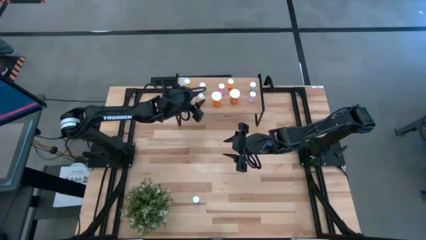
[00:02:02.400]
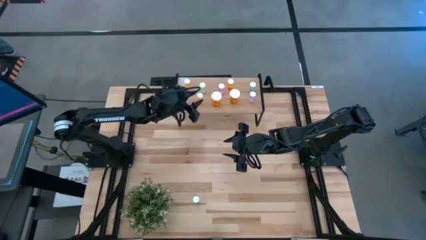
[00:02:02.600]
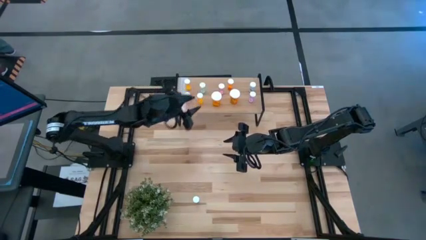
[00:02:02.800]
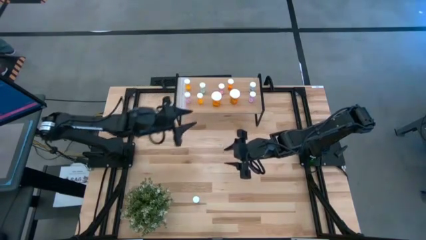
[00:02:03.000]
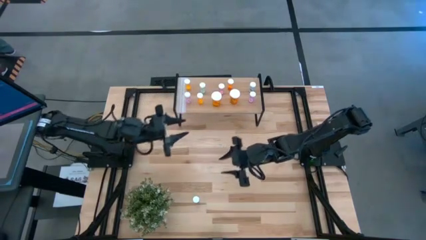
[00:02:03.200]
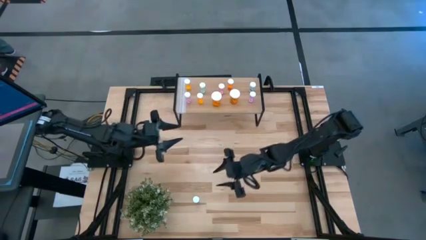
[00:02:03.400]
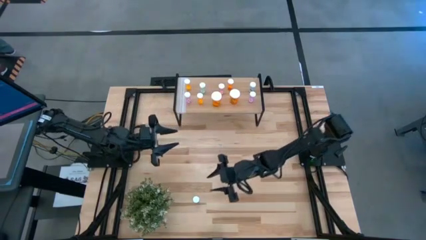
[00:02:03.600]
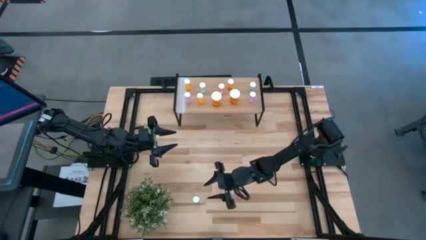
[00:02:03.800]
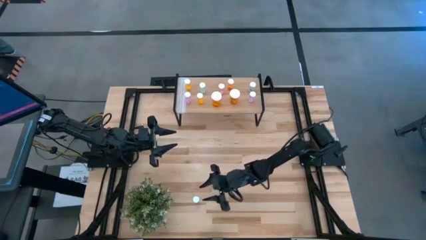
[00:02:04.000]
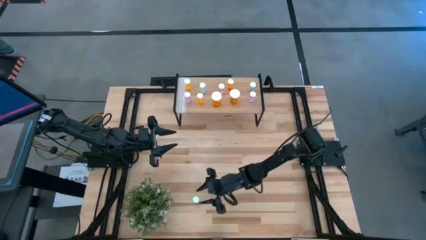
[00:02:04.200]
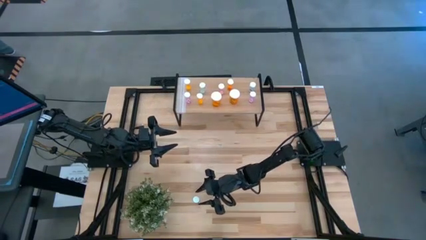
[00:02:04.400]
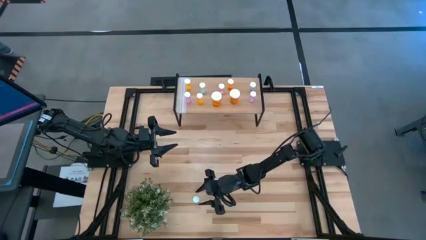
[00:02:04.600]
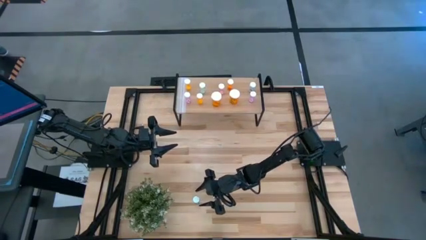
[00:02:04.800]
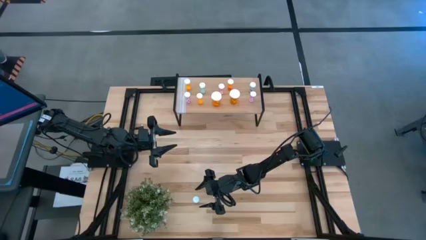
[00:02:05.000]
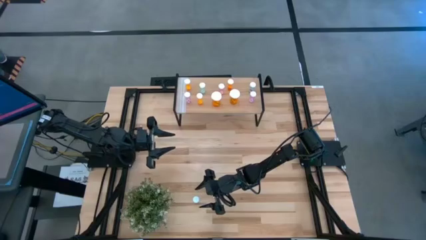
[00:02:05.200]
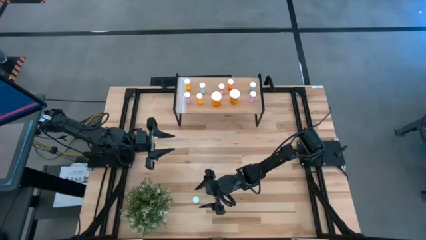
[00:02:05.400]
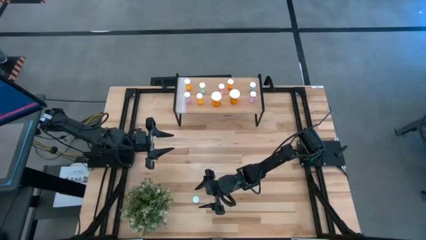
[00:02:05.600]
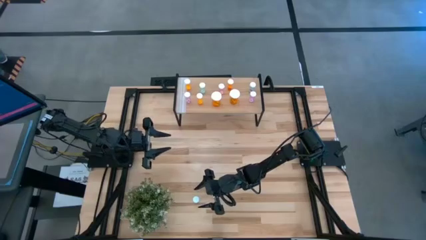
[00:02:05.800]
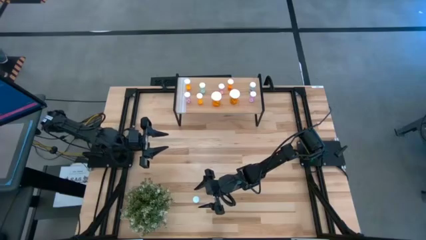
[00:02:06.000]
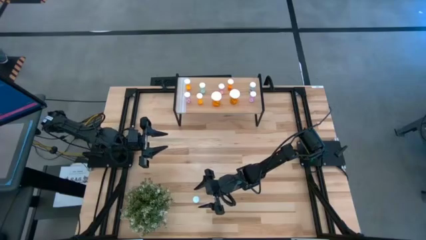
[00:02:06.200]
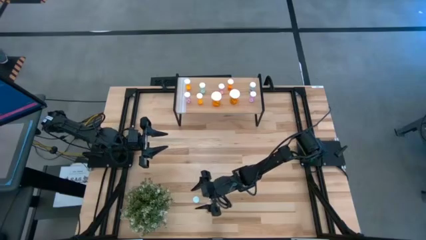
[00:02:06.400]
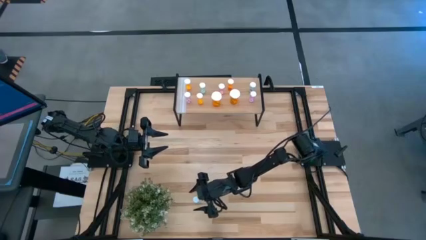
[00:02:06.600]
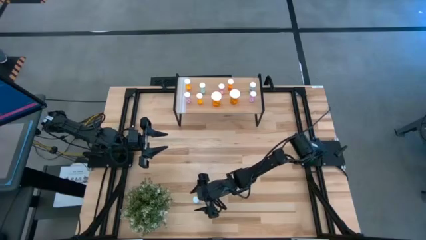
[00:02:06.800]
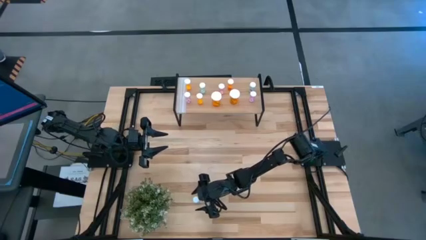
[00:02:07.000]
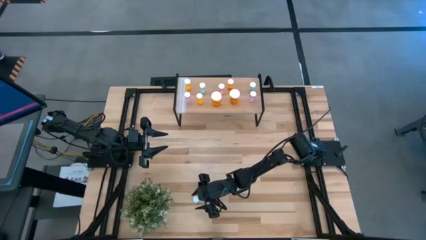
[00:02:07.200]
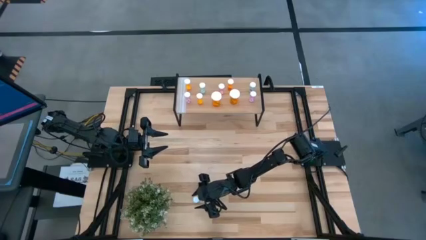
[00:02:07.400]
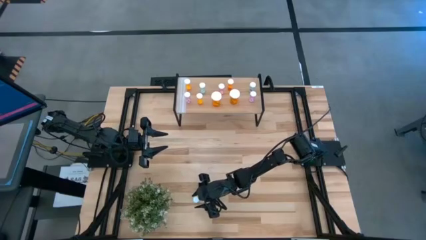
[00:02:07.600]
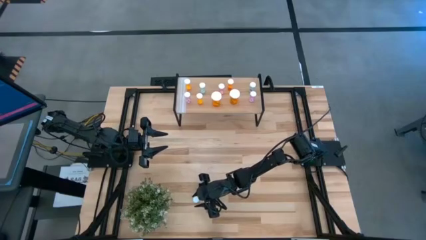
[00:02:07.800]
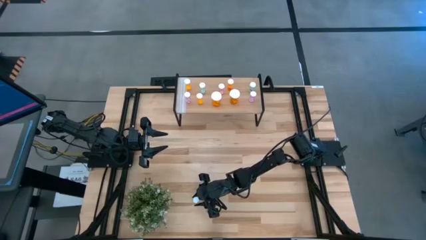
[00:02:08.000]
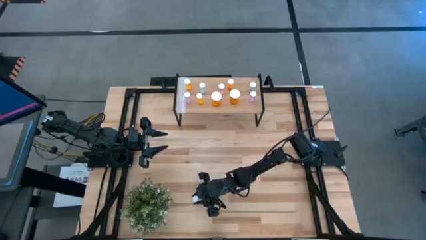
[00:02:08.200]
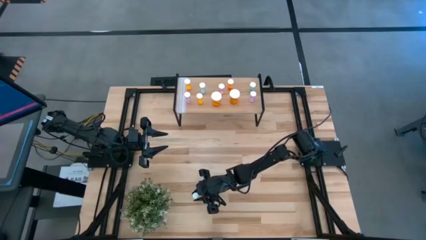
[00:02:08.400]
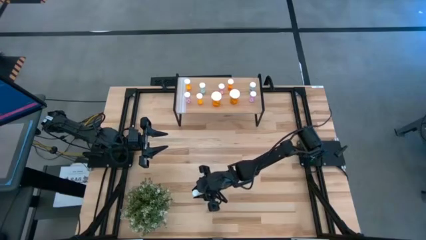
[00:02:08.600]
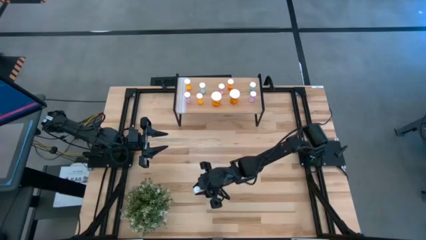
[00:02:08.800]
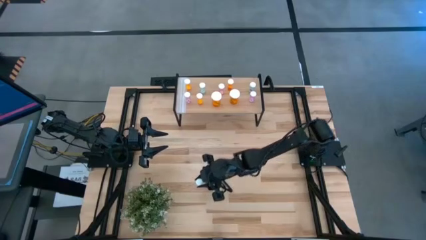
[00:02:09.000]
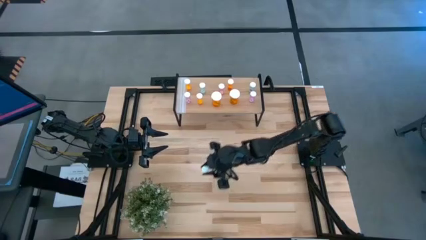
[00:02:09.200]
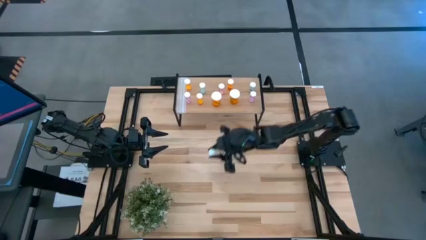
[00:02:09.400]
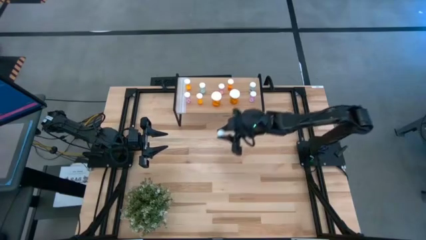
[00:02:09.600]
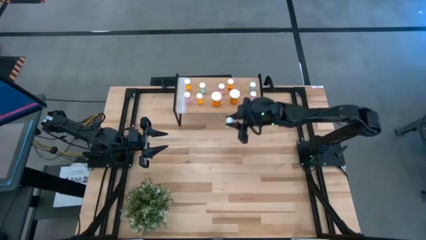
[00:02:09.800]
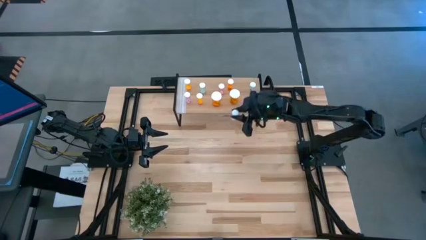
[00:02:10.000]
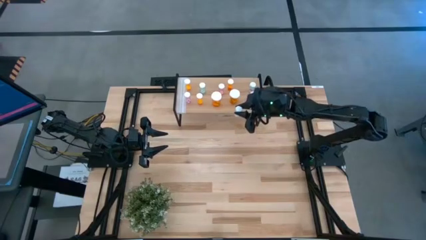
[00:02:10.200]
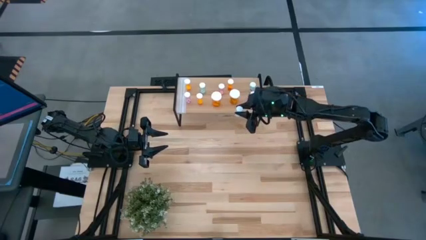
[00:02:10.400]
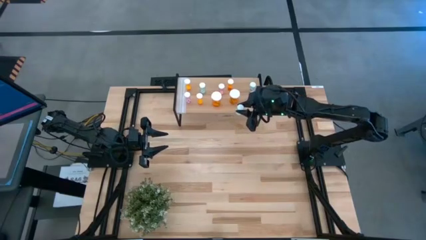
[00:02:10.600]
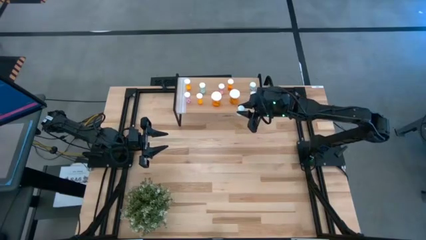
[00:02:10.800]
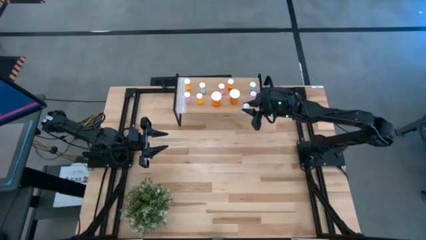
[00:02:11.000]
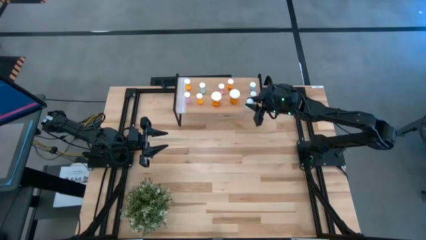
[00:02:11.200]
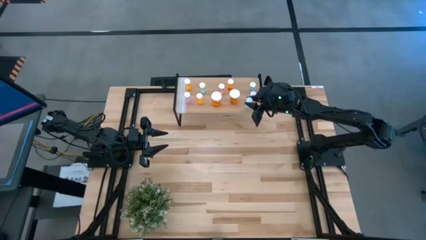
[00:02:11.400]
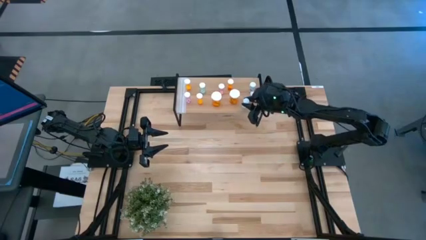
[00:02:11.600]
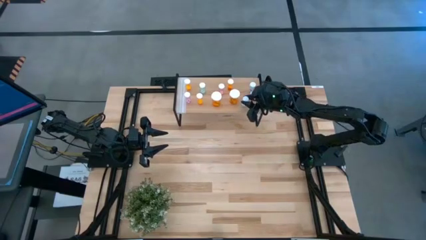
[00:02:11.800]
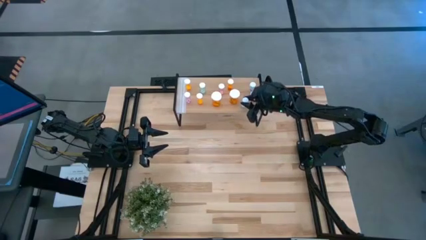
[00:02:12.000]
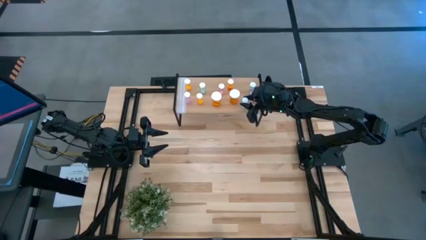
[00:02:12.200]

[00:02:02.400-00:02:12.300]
Task: Pick and place medicine bottles onto shelf by color
Put the blue pill bottle on the shelf

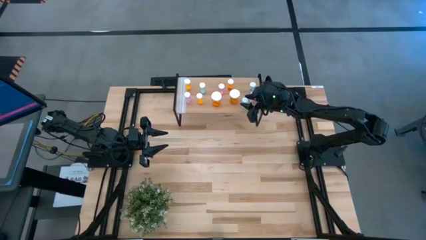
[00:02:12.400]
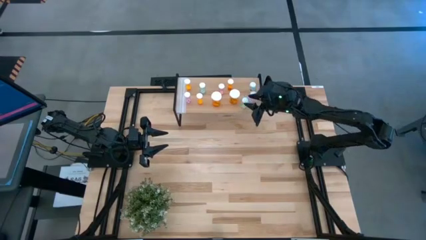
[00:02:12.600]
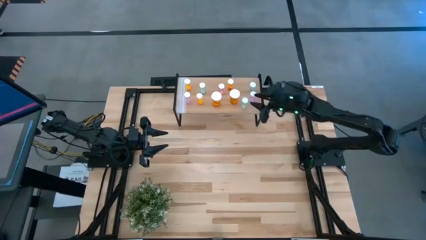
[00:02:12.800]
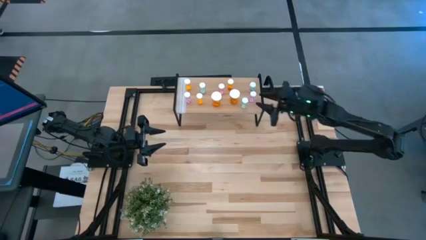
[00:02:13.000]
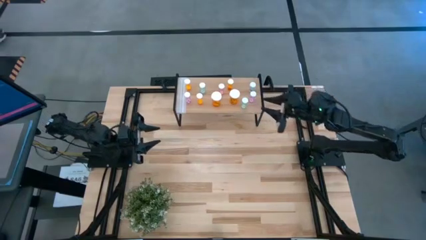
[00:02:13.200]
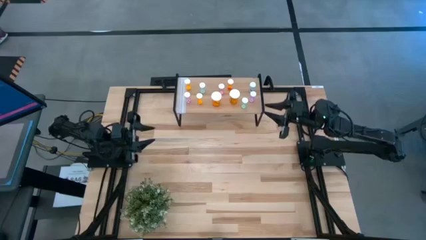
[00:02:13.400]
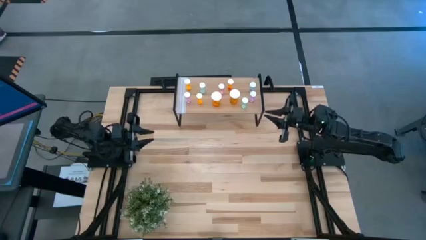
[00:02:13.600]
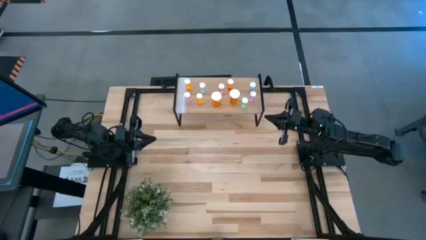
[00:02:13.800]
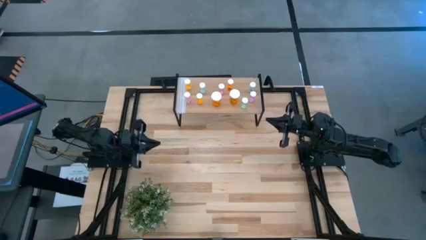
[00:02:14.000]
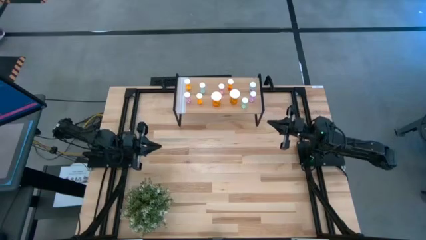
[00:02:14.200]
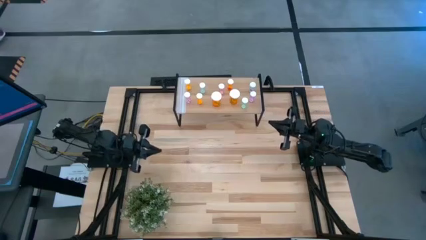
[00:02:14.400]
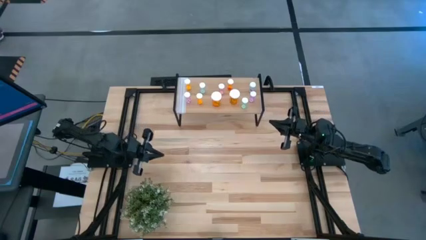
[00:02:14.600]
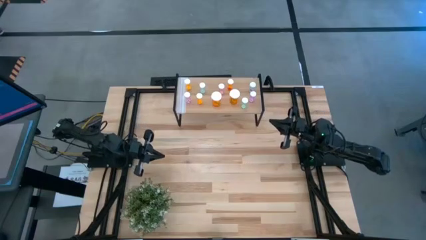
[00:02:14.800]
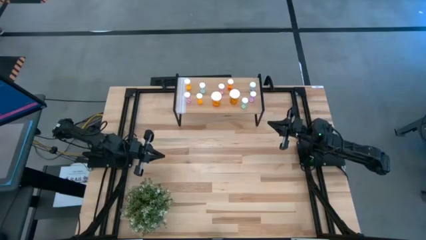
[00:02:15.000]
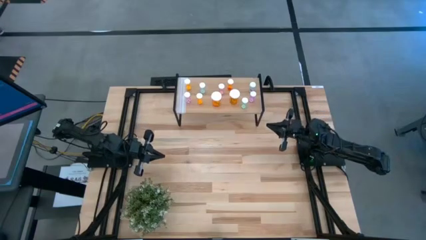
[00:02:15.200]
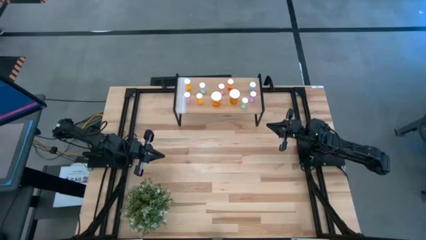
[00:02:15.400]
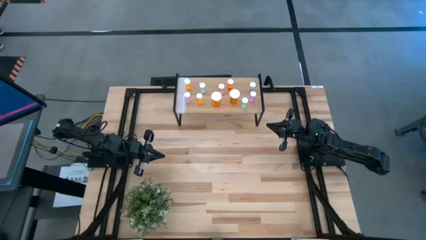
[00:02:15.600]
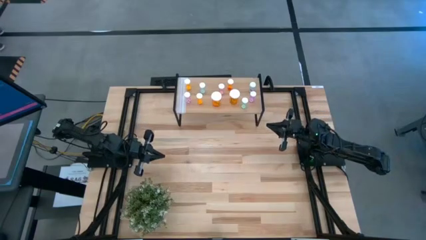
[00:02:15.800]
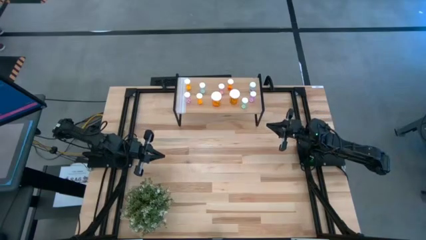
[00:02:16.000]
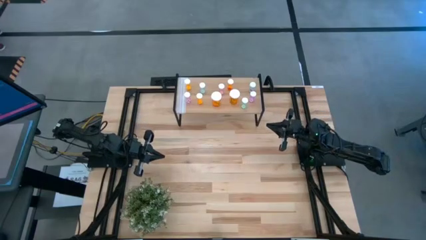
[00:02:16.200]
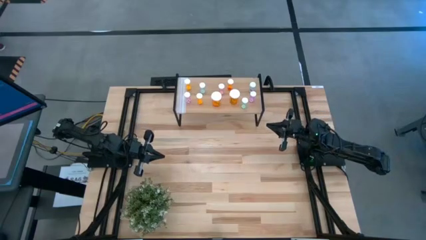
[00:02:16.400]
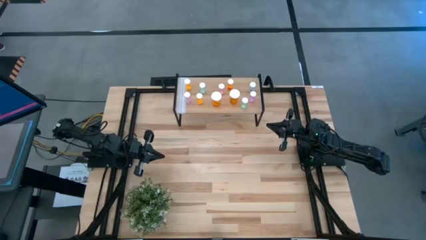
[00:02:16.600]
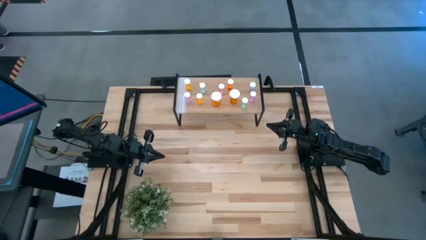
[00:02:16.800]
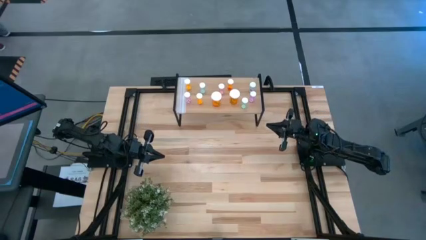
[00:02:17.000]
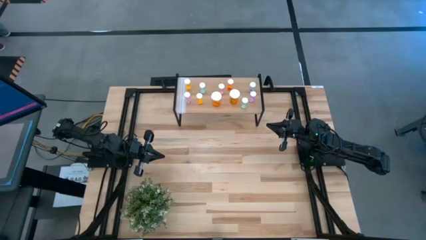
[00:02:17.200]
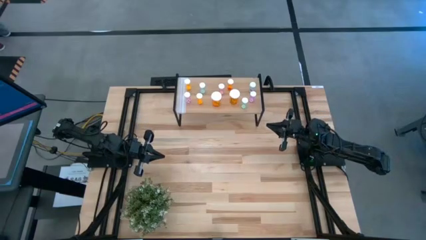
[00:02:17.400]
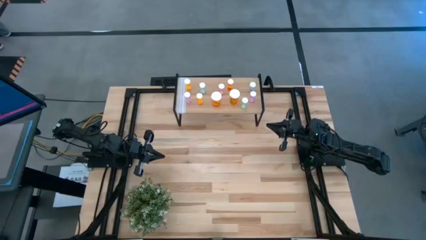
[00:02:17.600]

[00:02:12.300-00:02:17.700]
Return to Home Position
